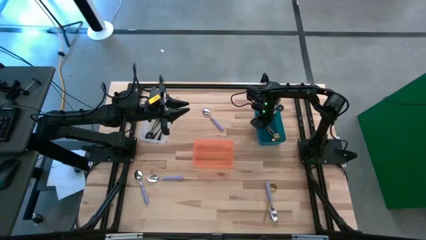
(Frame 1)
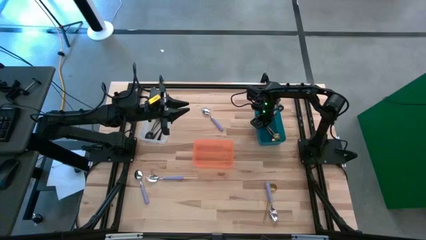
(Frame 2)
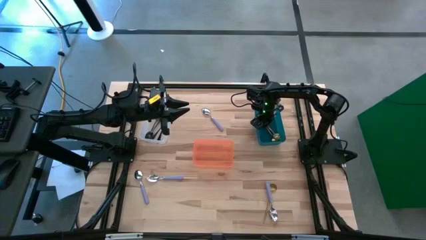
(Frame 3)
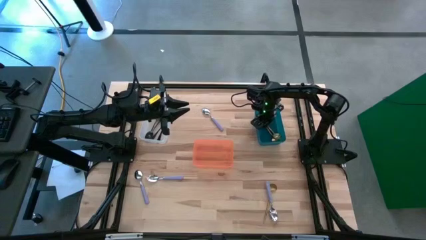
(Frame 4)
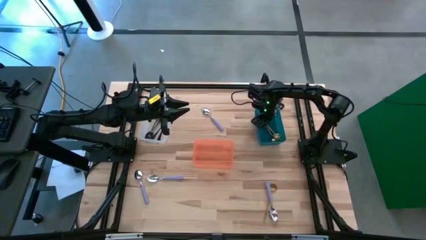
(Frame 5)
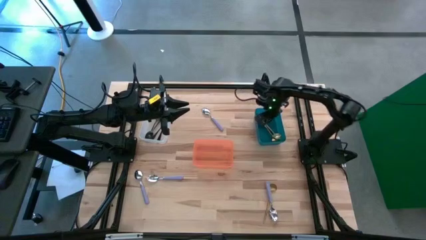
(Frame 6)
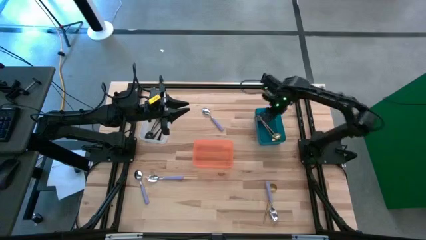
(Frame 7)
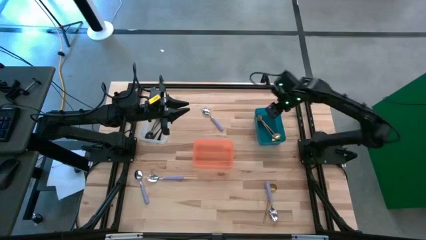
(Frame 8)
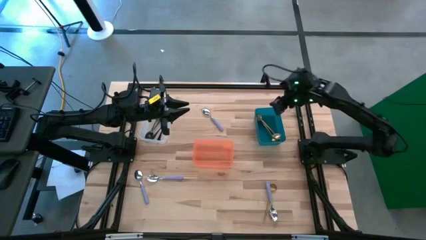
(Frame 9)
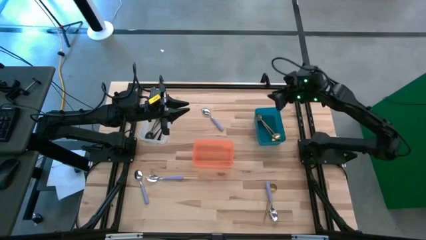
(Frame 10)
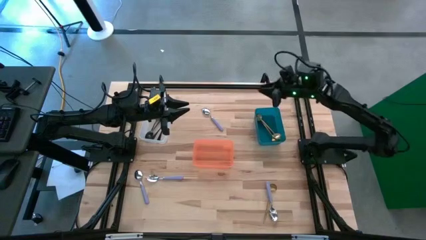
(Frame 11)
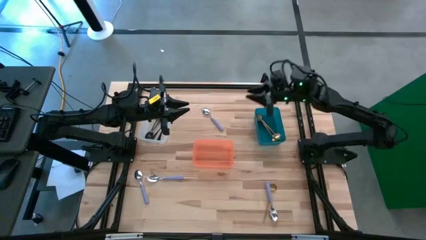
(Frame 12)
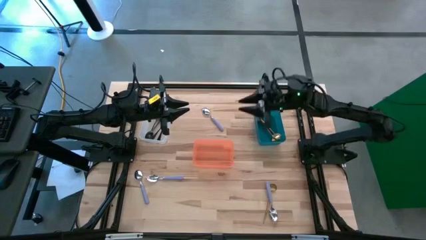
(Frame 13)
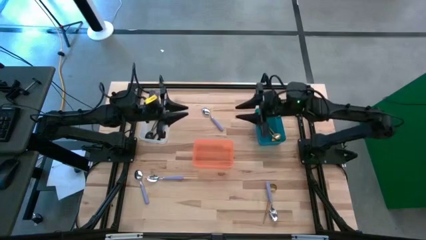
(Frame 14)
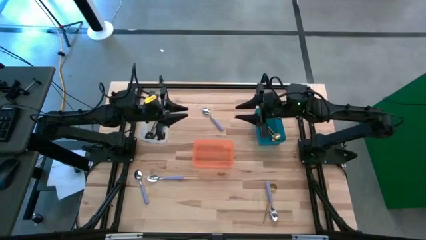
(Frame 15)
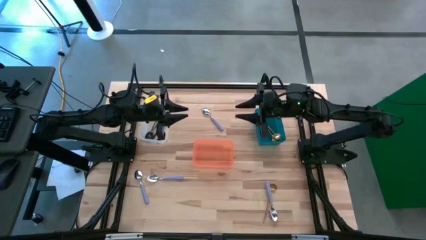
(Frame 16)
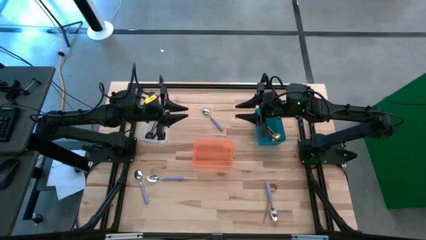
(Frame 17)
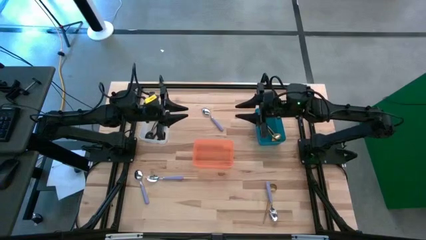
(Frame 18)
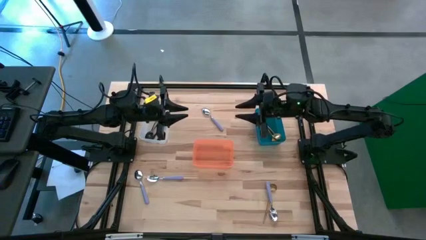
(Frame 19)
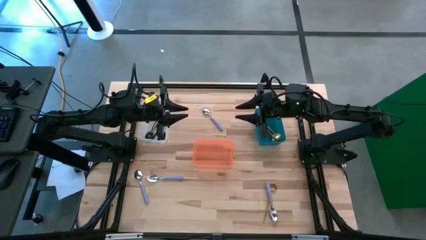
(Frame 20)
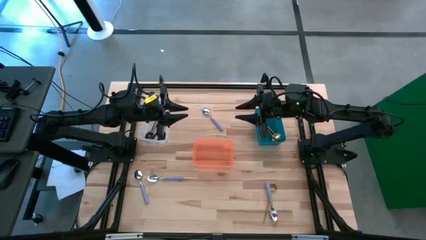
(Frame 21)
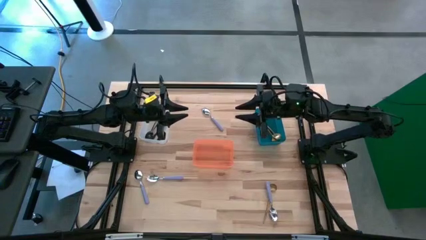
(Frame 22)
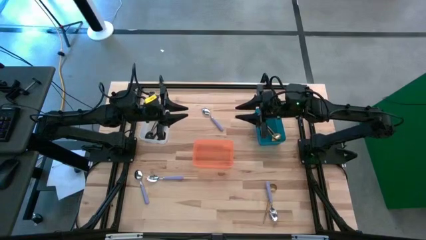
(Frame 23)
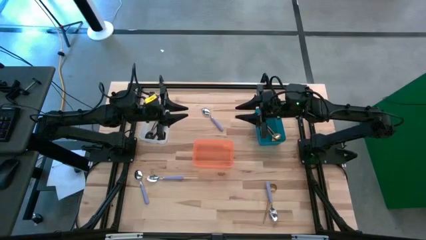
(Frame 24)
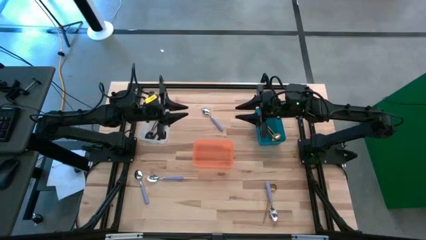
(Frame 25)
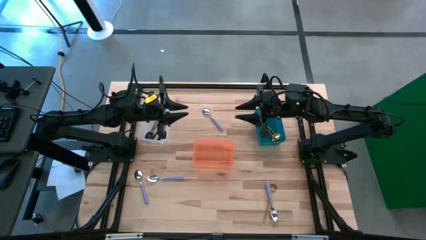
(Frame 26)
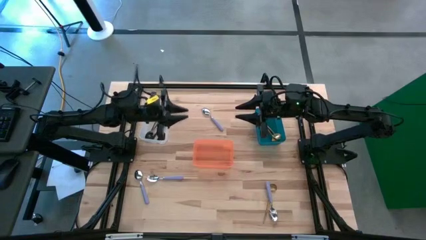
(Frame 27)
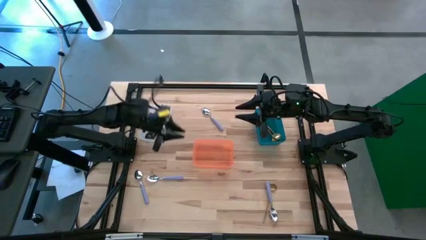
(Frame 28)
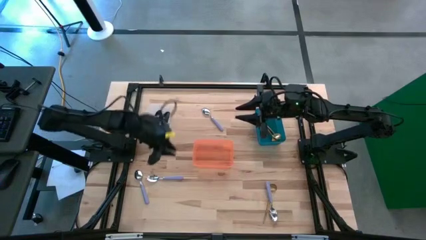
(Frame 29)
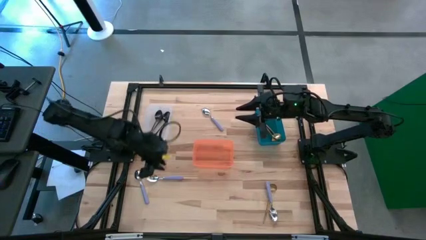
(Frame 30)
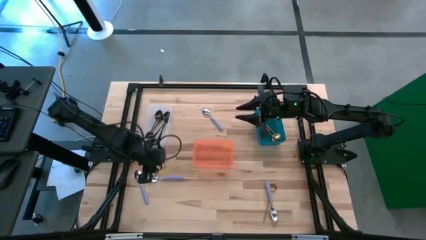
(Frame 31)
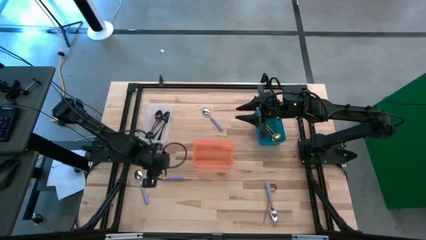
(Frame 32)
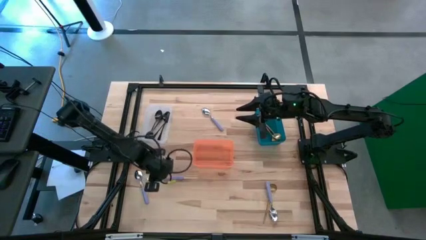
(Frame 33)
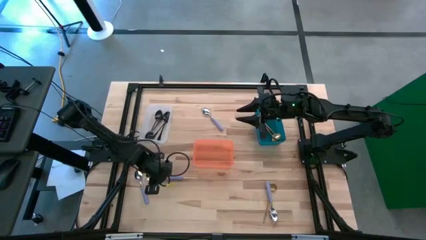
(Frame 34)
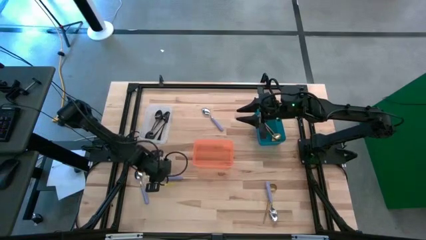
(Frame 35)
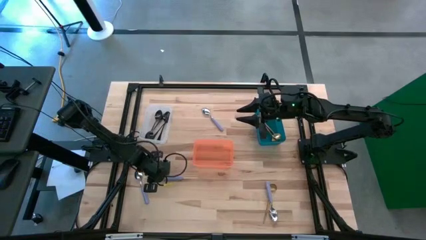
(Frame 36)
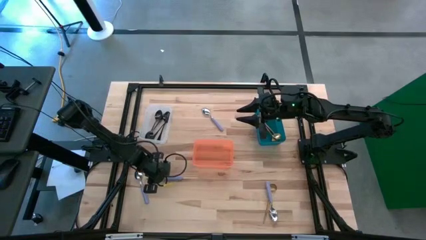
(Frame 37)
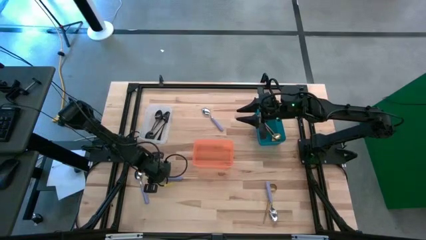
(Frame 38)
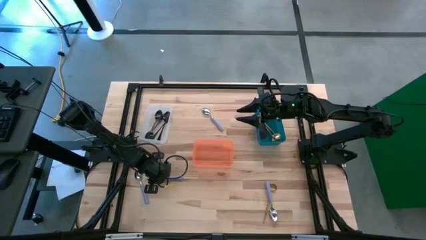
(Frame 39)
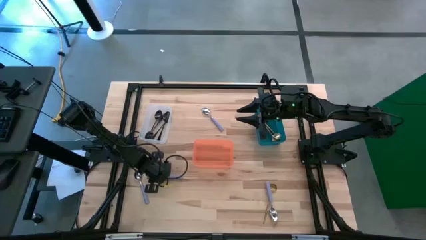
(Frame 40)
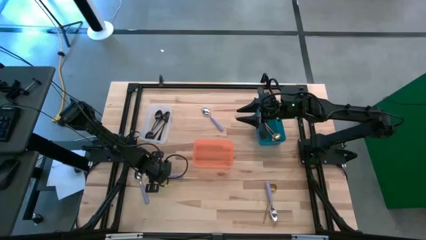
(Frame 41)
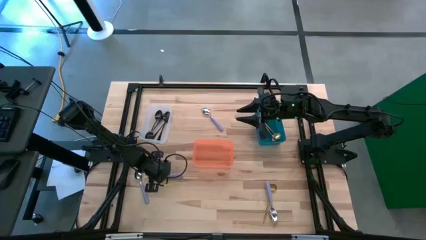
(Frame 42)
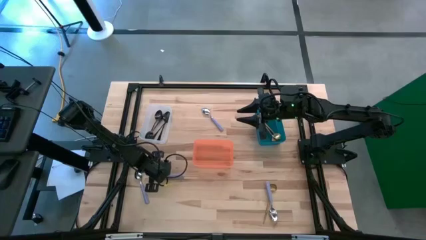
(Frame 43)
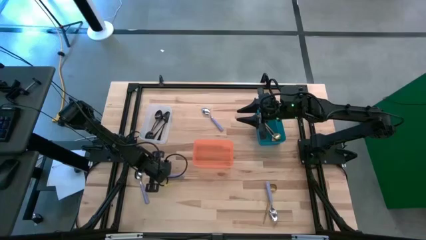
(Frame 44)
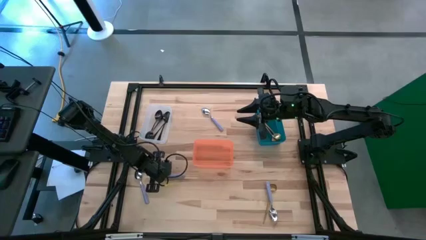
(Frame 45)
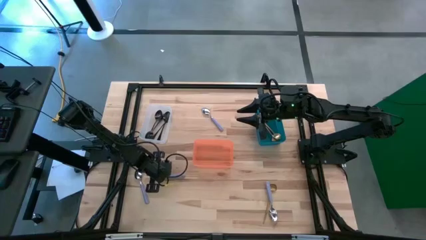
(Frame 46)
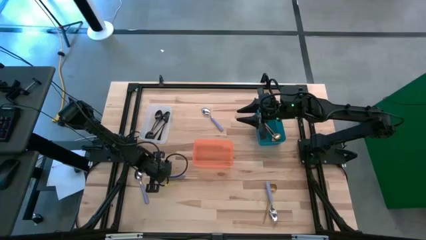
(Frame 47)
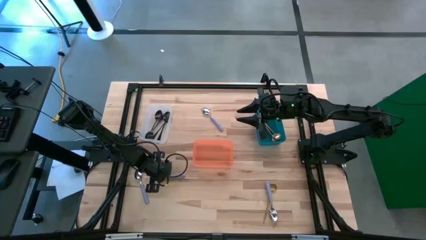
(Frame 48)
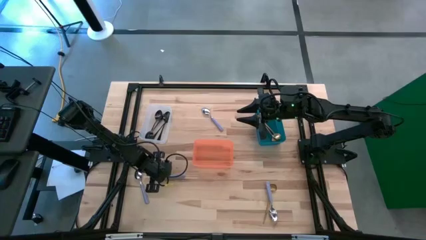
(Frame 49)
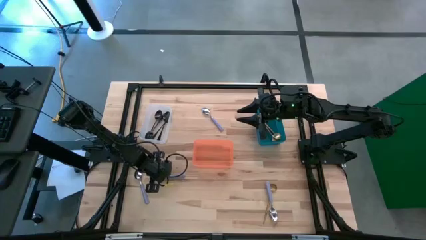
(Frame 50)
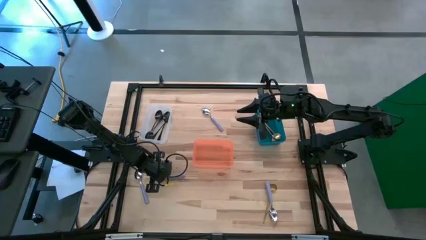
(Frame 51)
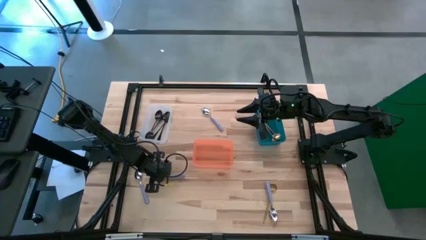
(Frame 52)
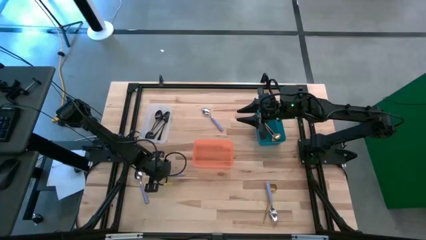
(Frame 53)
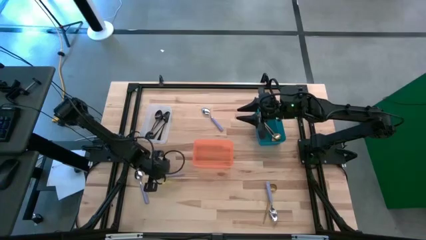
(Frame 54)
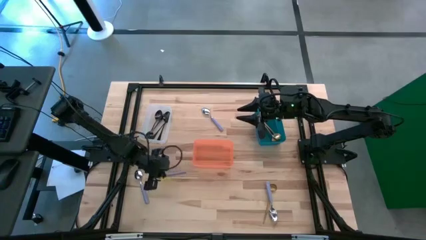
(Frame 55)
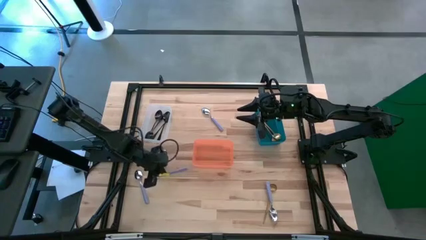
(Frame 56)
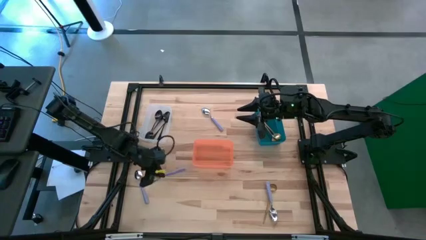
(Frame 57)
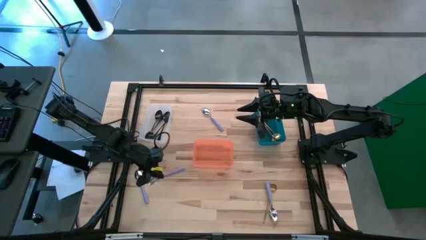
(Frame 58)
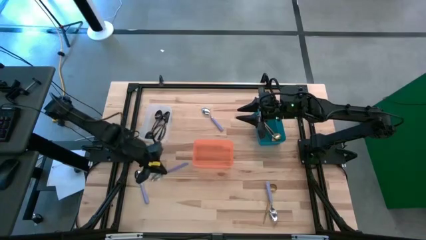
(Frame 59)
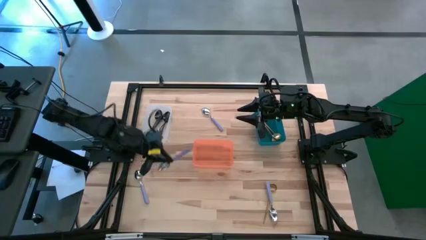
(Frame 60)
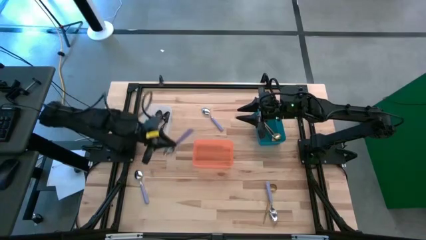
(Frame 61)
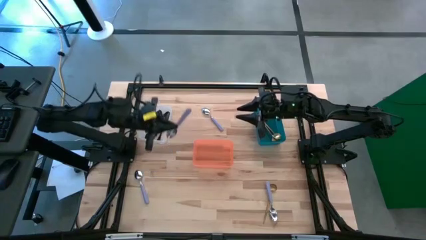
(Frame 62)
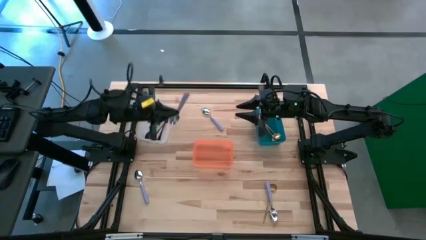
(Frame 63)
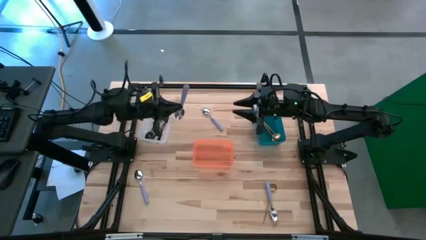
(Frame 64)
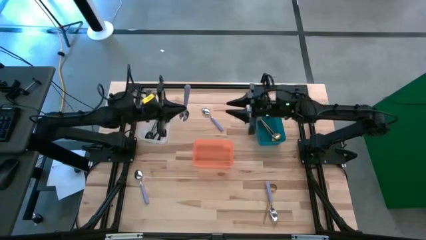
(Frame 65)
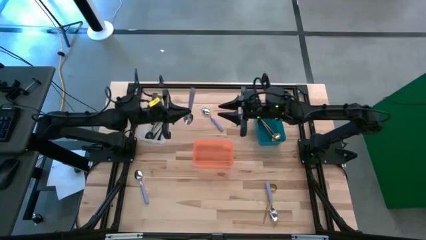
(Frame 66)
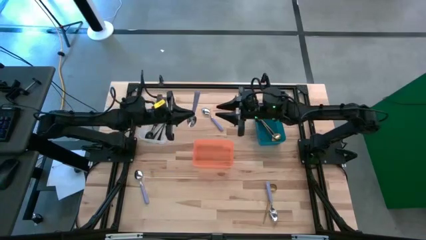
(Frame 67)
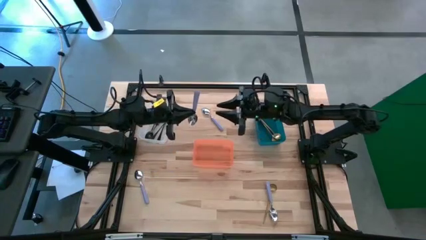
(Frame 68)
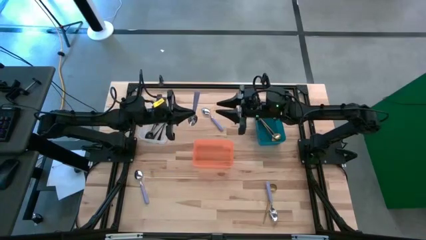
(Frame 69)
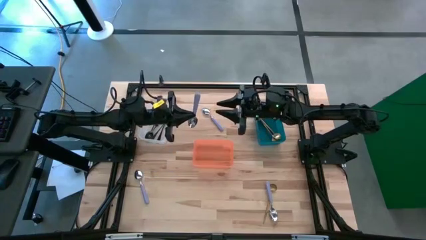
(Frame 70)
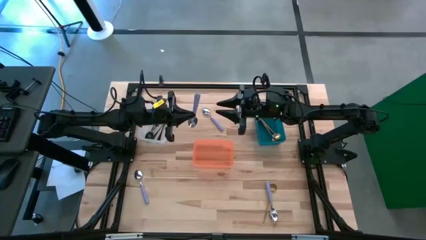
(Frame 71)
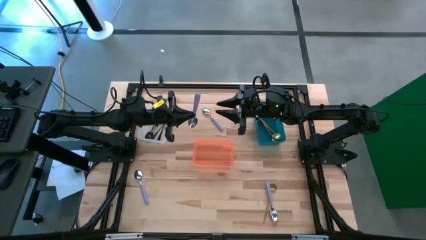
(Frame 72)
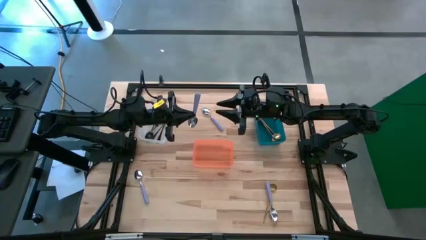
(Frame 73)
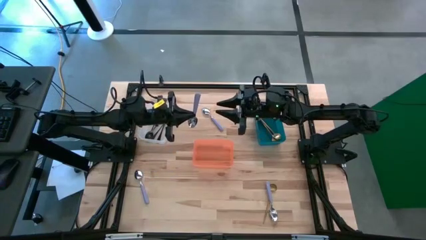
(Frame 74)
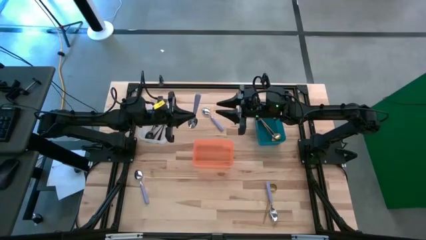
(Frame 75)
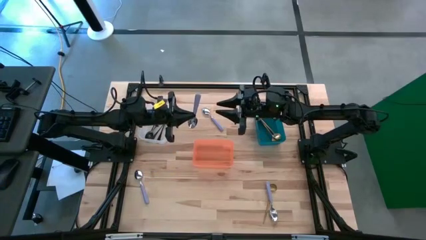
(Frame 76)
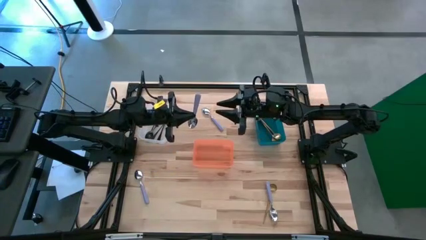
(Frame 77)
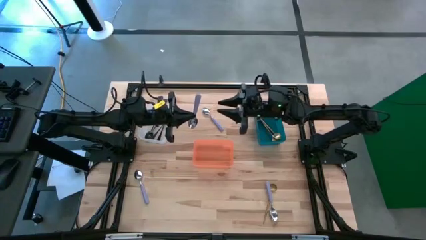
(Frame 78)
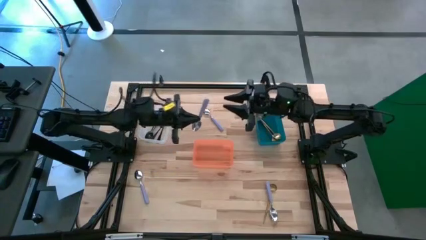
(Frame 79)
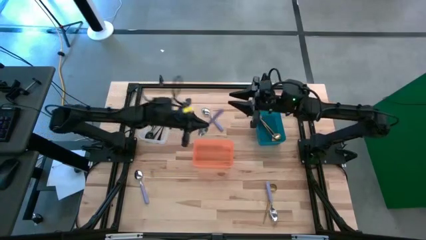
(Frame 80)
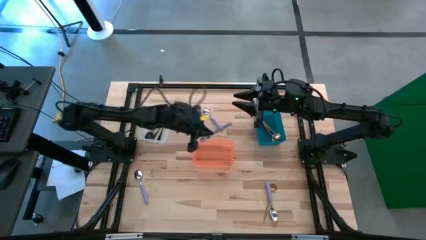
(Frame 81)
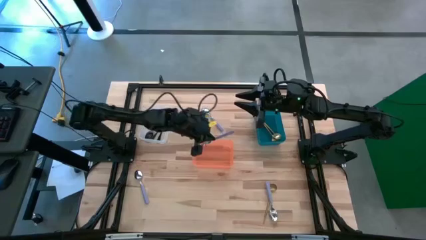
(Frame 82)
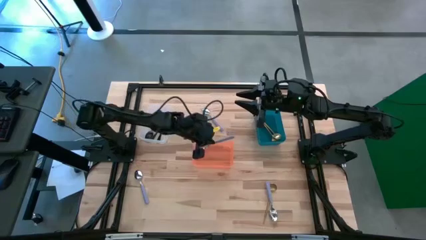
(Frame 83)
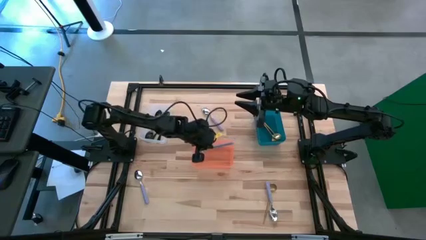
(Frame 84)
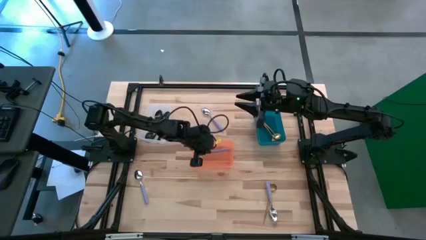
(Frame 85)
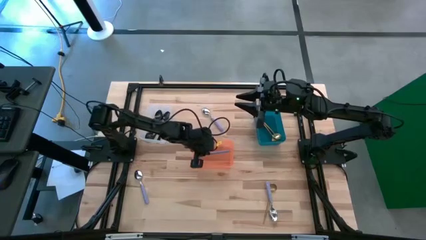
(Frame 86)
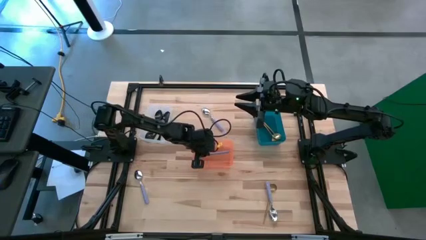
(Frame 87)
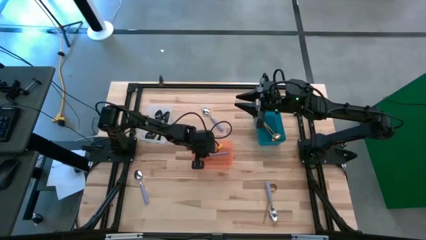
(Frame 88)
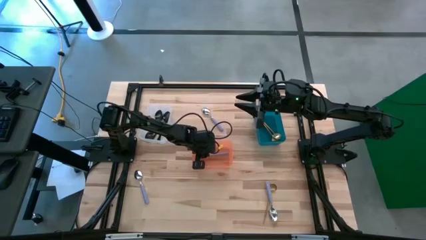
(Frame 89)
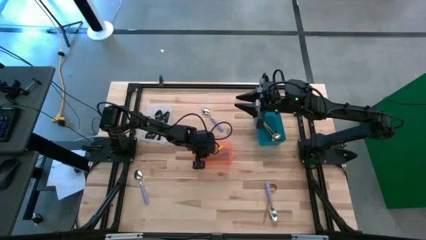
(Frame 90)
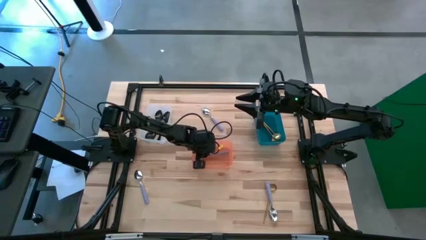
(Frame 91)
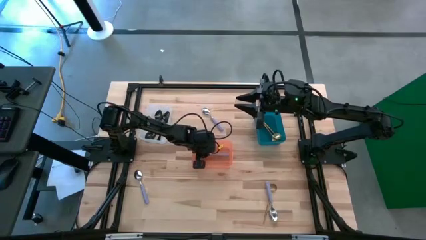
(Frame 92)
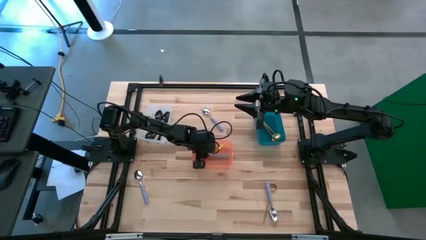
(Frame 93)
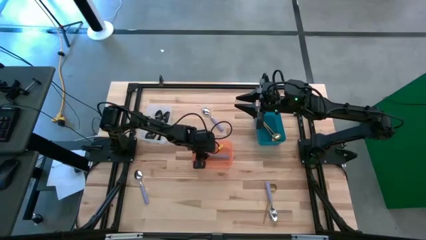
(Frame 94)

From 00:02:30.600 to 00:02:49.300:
Task: Sort silverware by color (type)
Put the bottom left violet spoon into the orange bin
